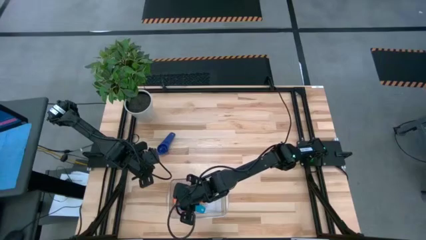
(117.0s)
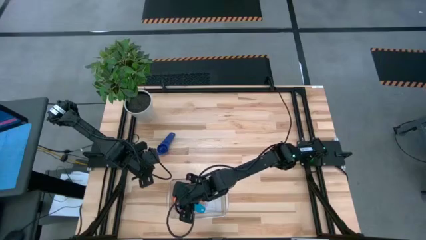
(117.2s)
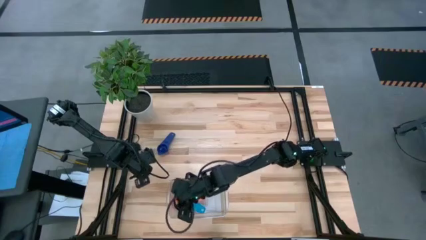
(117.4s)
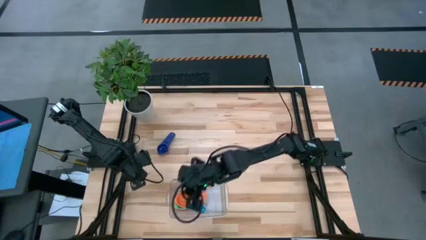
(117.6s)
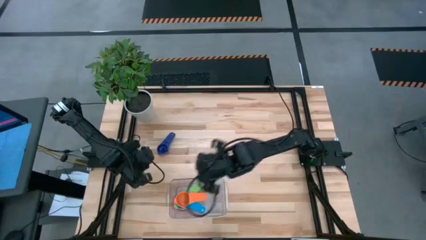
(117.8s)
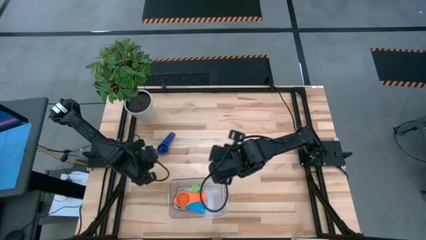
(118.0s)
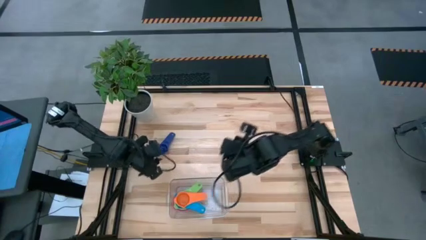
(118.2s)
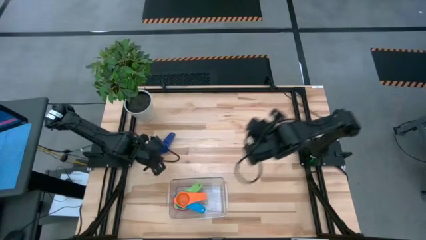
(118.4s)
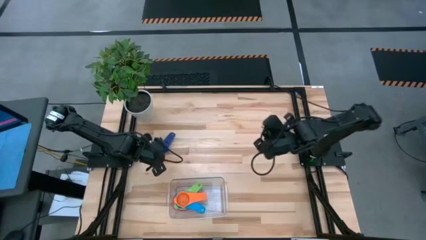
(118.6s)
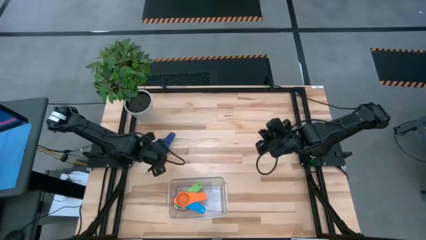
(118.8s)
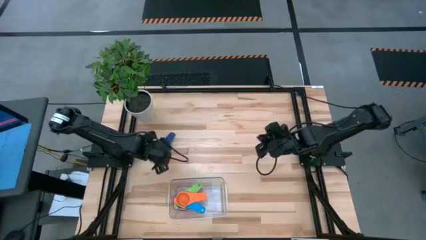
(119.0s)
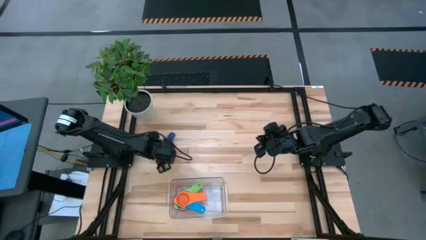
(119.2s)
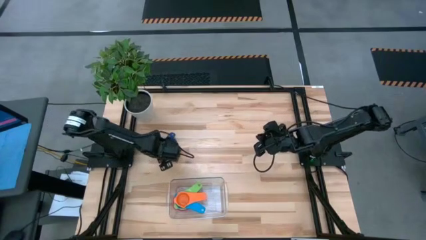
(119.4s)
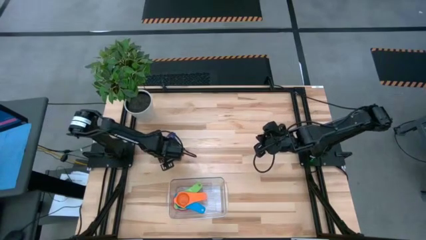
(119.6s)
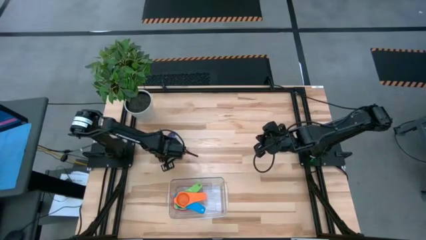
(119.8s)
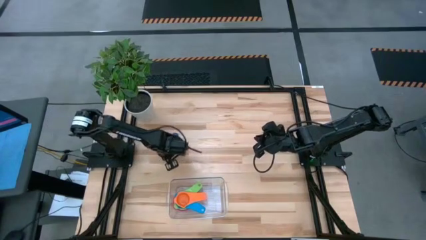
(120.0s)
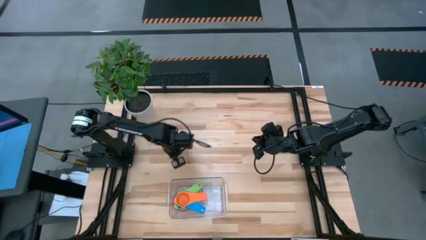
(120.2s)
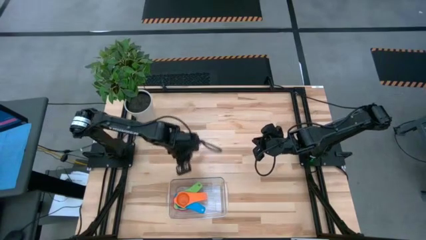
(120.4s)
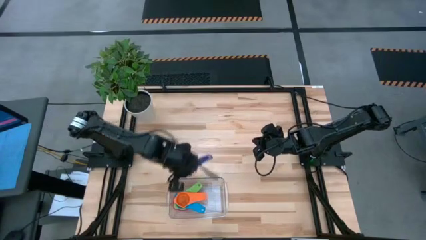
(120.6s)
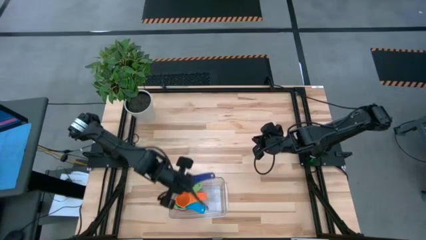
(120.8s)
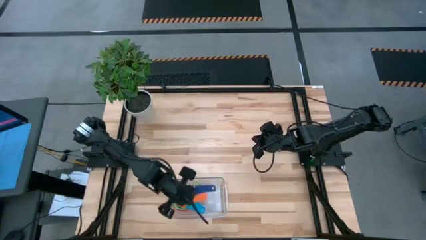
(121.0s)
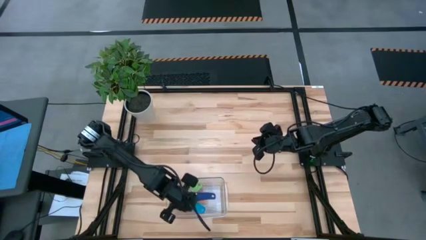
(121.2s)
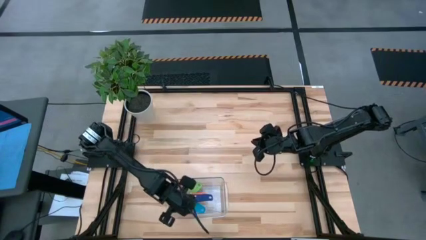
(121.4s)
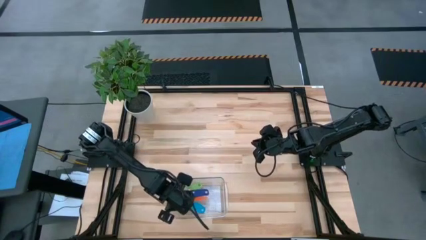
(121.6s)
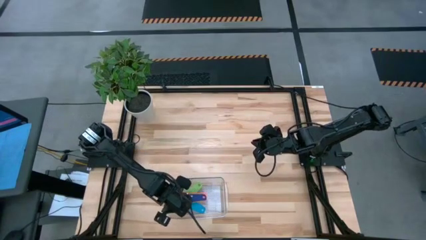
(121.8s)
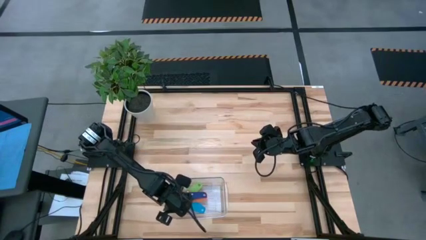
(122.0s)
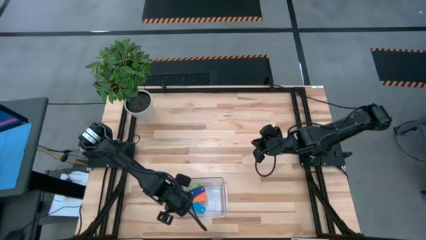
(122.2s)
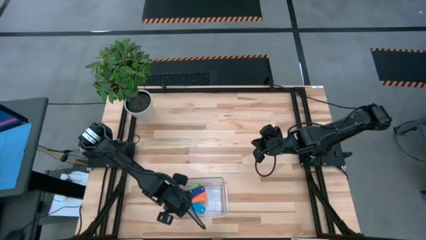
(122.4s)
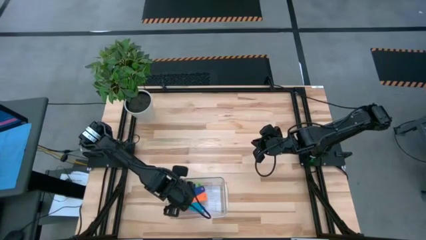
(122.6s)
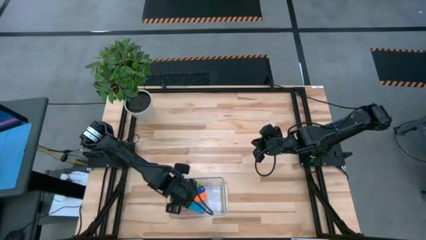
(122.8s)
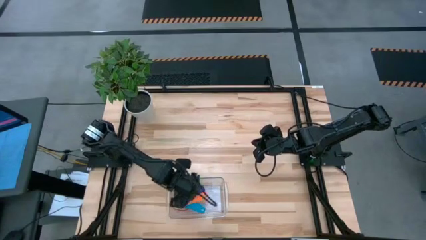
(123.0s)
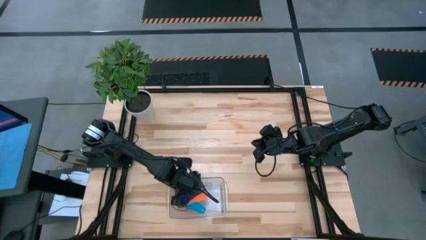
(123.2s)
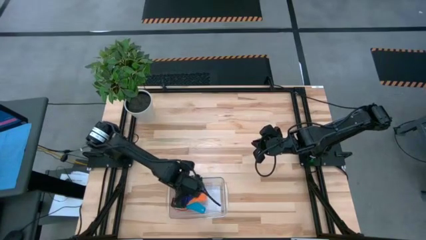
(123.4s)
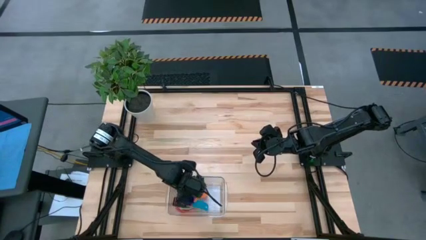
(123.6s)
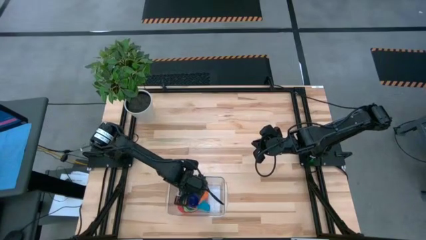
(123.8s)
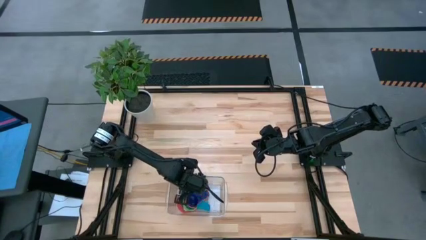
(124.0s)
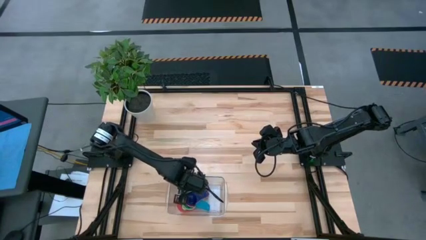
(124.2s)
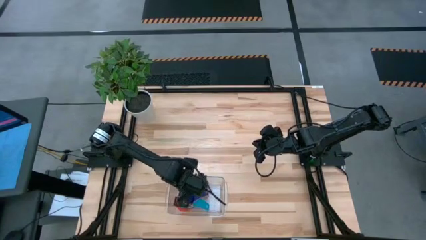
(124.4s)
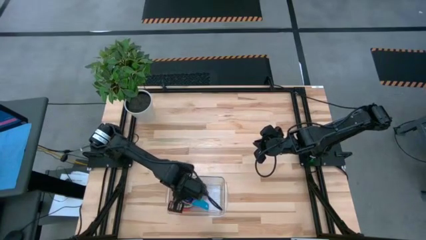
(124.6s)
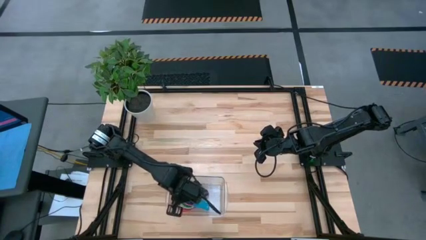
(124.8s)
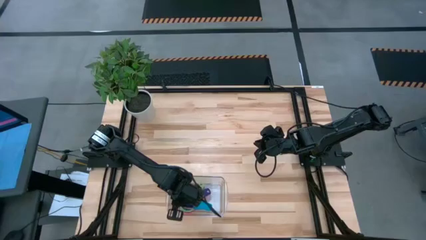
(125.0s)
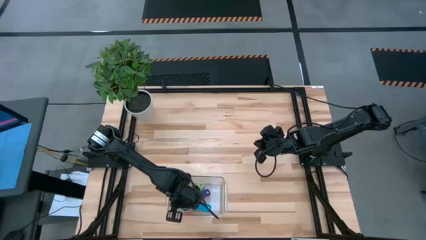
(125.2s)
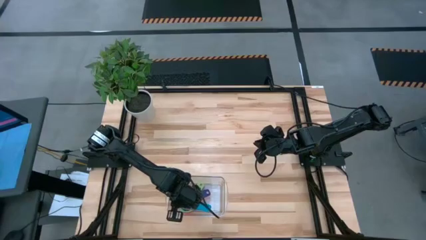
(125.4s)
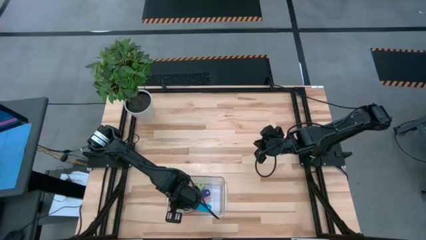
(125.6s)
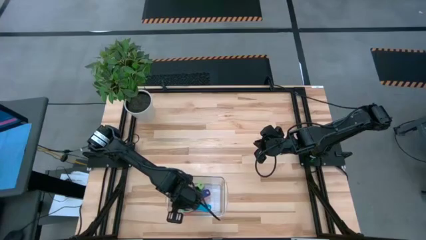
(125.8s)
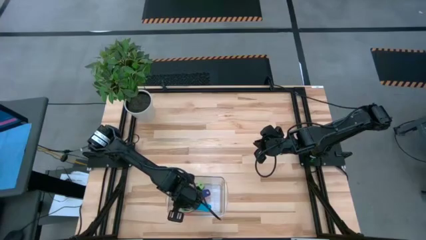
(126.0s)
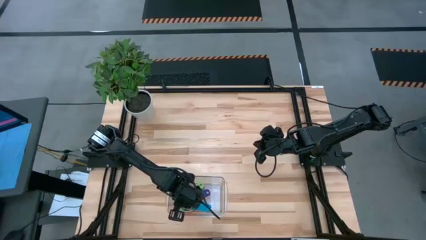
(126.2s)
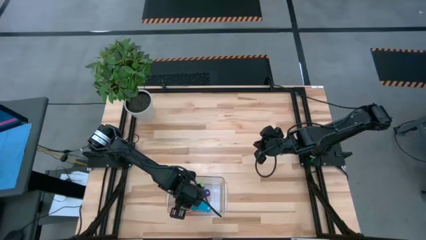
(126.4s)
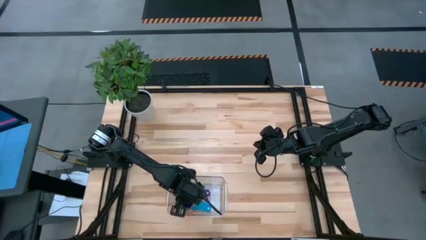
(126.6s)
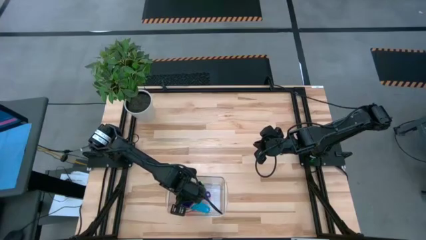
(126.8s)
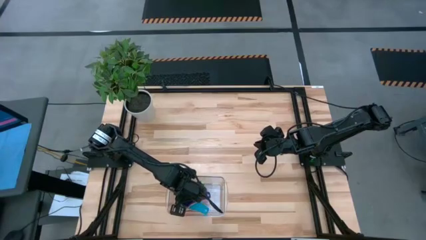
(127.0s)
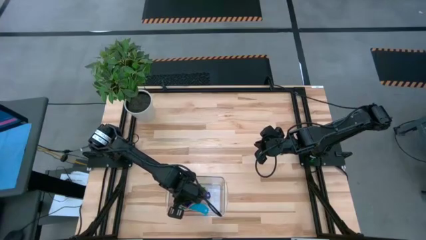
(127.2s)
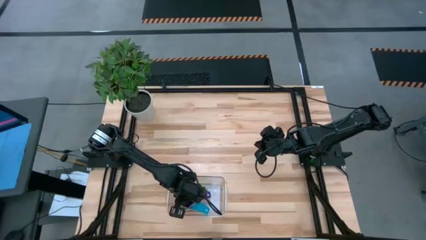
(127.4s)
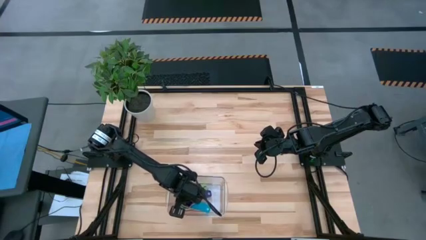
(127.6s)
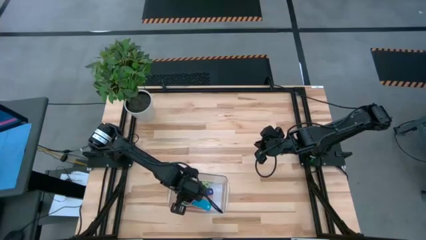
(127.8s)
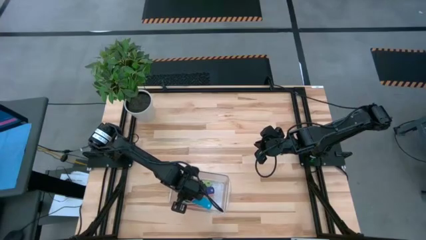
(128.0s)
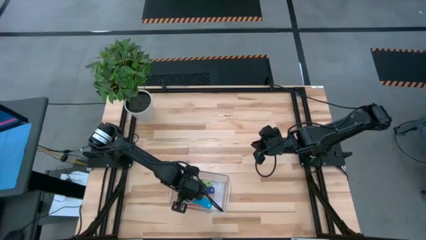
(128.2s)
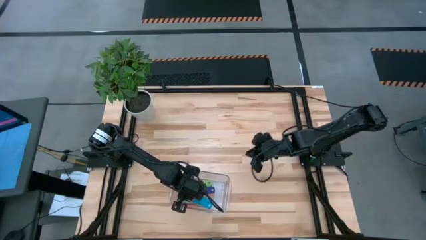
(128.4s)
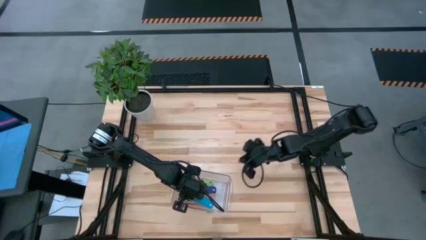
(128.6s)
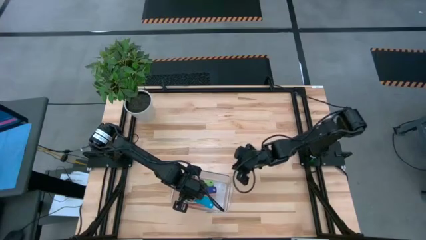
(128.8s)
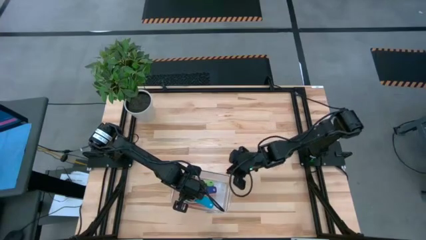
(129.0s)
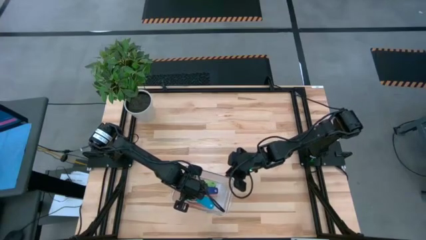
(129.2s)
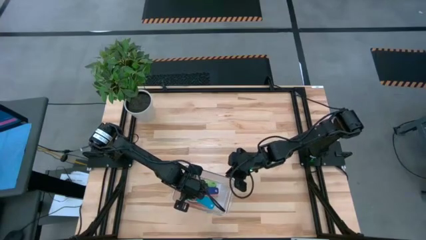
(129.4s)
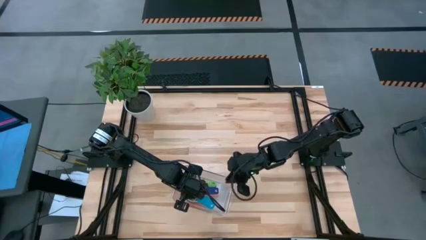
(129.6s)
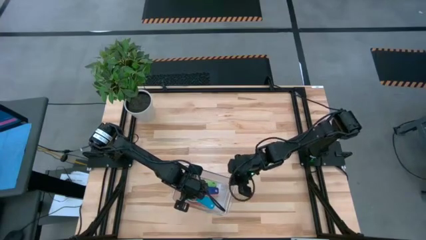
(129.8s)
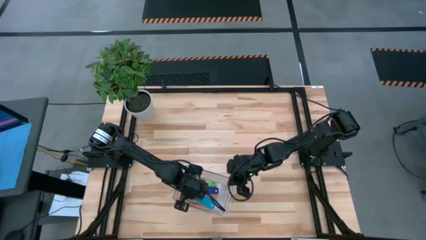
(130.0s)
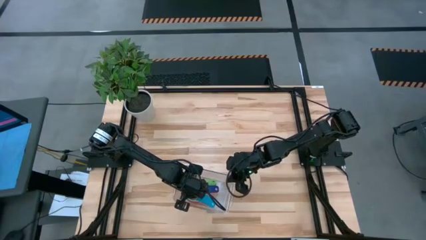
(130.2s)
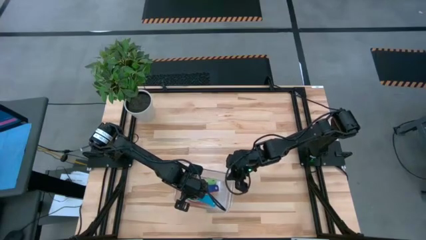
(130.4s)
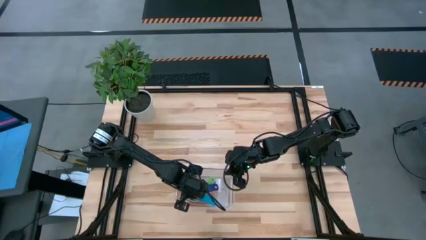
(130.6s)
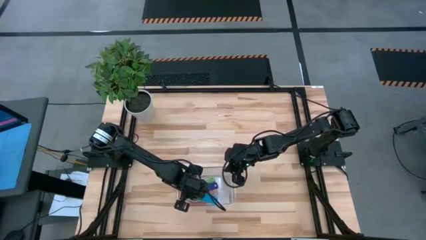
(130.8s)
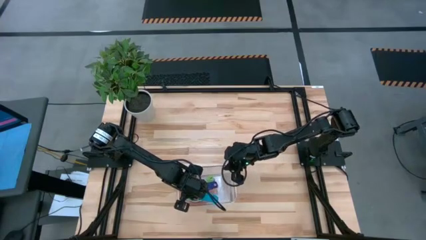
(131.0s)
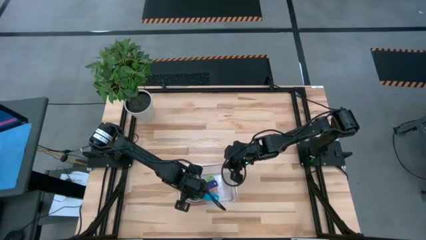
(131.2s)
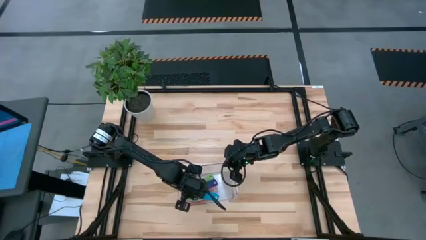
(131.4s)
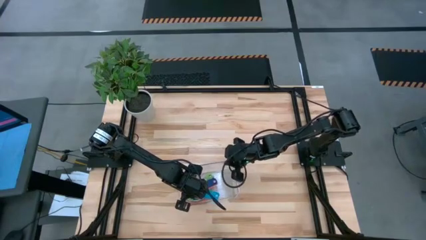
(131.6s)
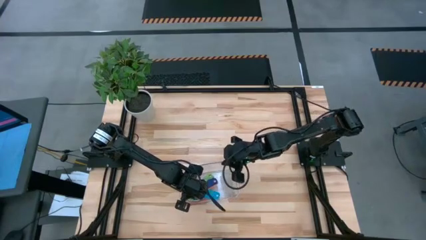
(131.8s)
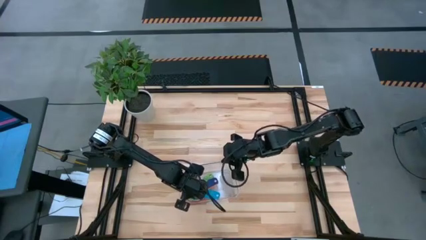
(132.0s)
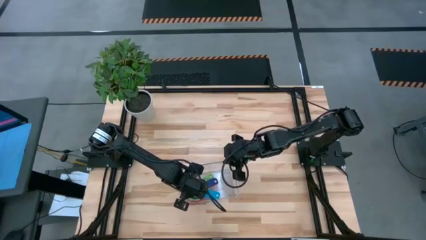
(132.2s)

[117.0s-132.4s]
Task: Nest measuring cups in basket
Stack the dark blue measuring cup on top of the orange measuring cup into the transparent bin

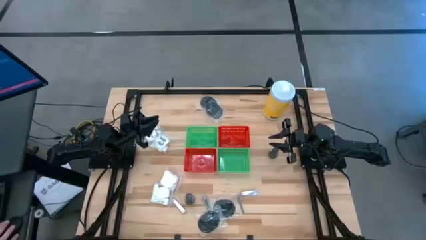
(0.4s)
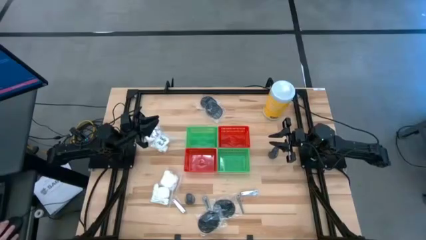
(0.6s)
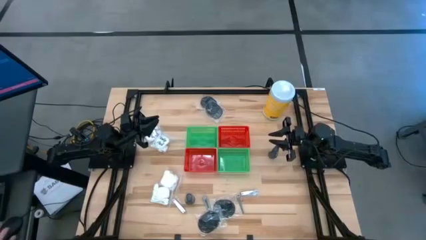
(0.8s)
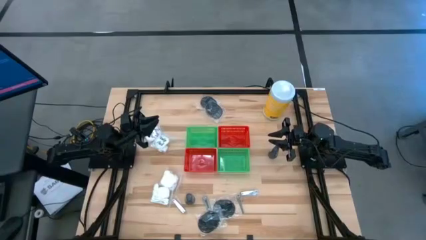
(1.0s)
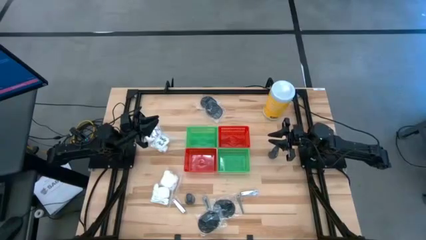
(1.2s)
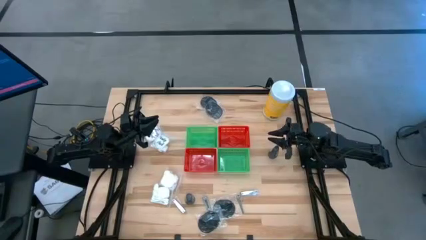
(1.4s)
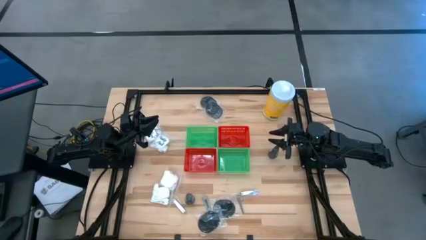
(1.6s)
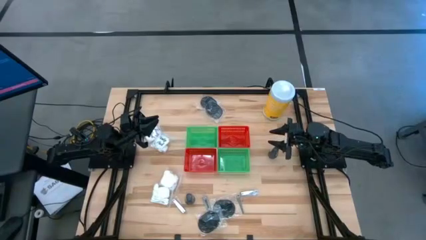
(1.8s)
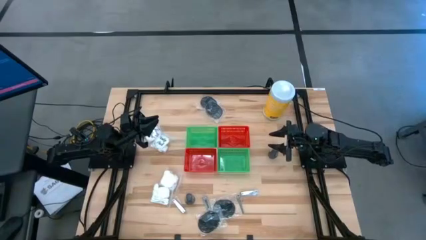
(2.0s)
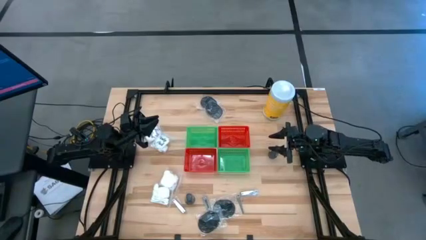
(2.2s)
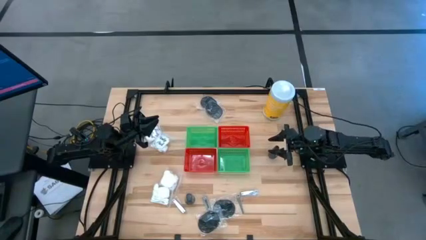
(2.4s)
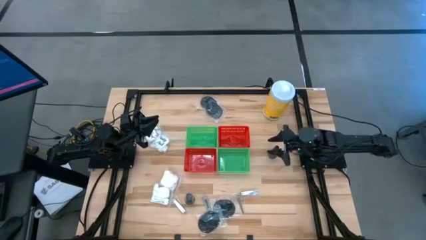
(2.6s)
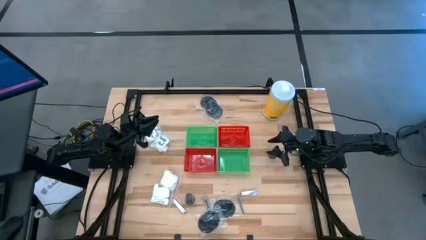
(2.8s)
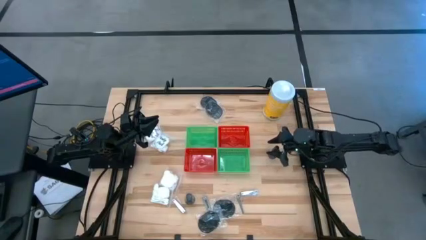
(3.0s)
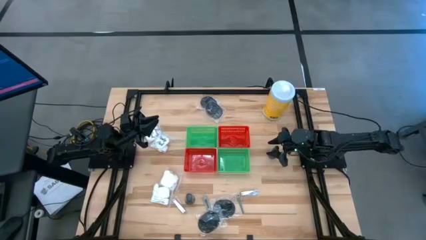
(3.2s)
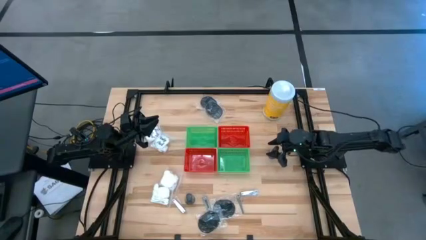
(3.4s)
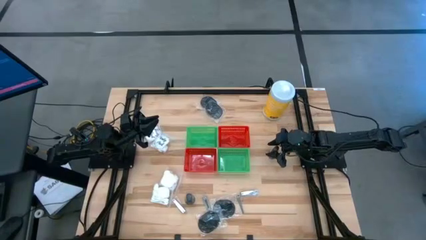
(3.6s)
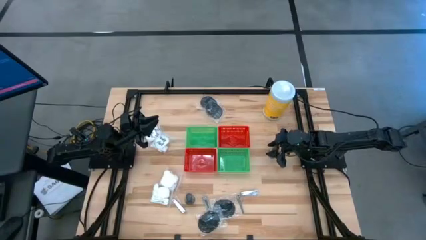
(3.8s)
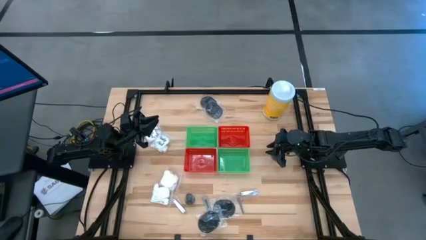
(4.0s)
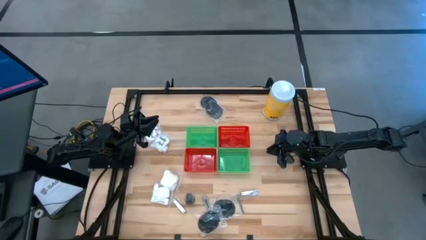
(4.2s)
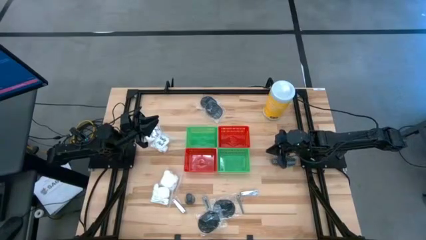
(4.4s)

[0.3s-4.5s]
Task: Pick & Place Travel size toiletries
Put the dark gray deodorant into the right green basket
